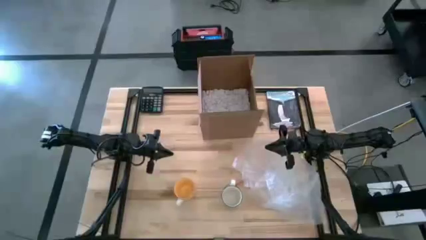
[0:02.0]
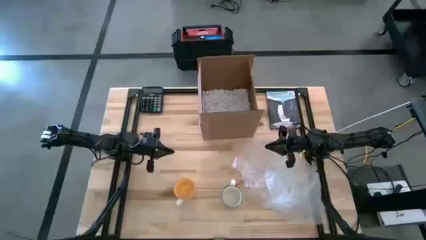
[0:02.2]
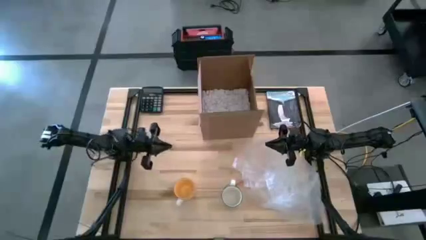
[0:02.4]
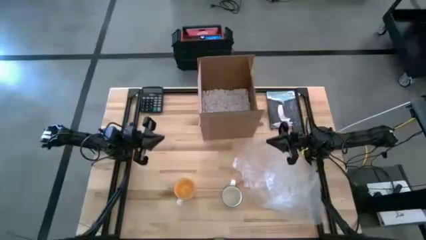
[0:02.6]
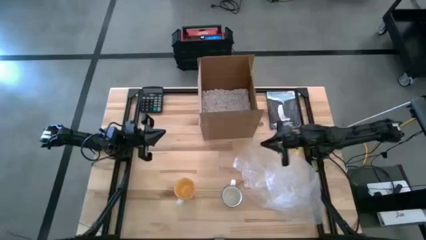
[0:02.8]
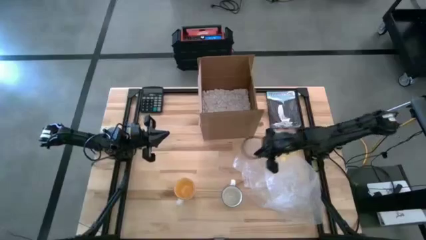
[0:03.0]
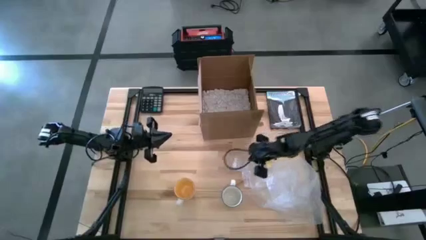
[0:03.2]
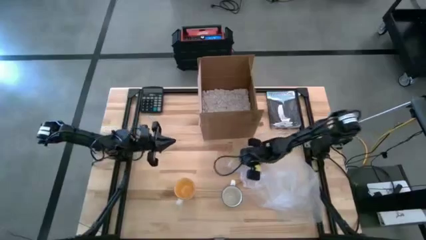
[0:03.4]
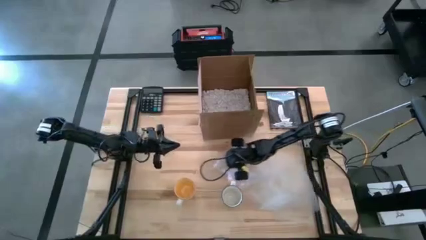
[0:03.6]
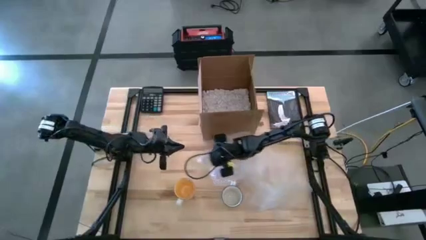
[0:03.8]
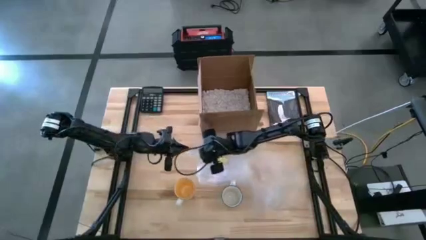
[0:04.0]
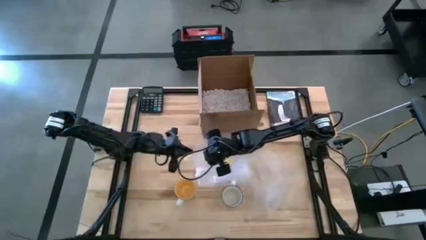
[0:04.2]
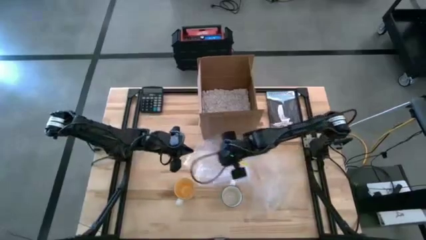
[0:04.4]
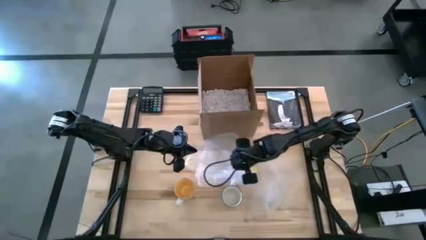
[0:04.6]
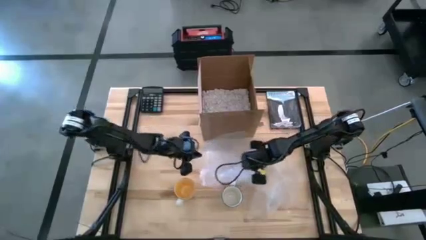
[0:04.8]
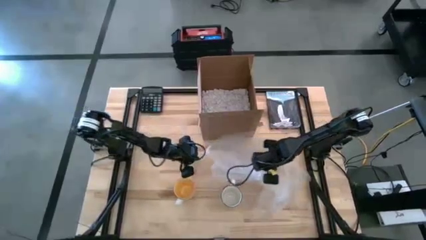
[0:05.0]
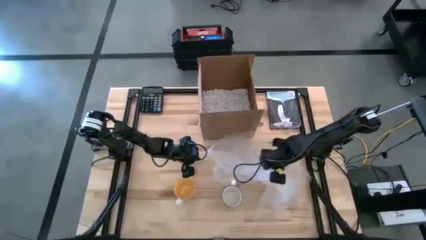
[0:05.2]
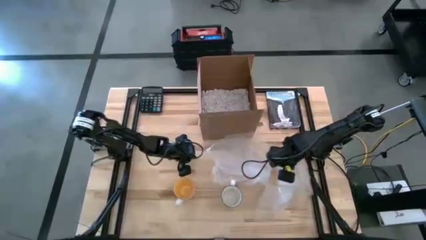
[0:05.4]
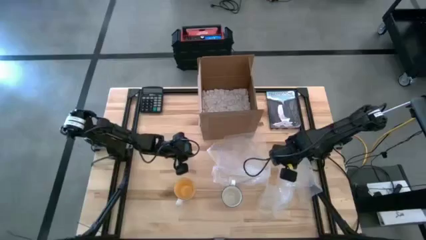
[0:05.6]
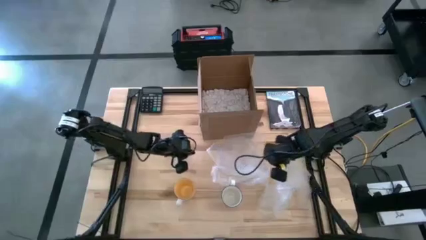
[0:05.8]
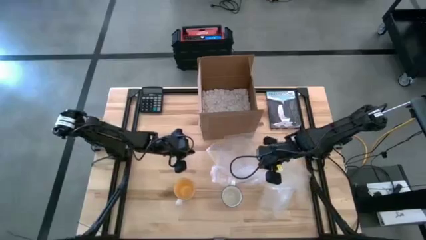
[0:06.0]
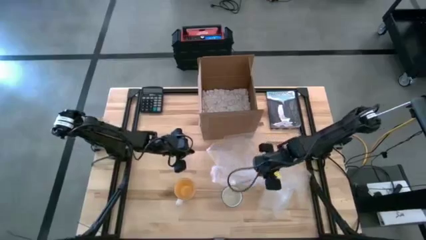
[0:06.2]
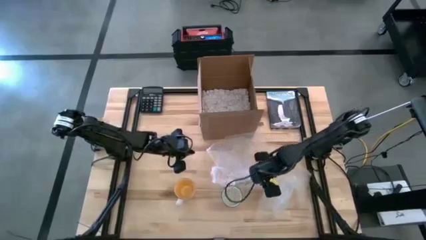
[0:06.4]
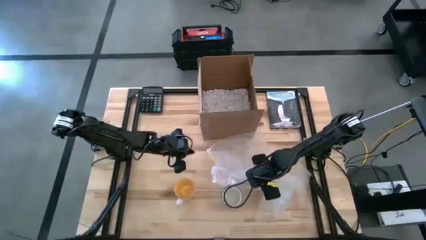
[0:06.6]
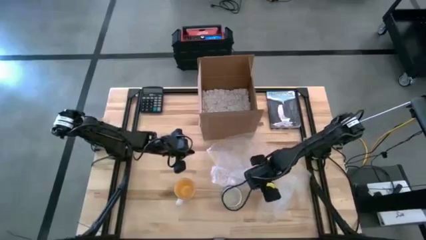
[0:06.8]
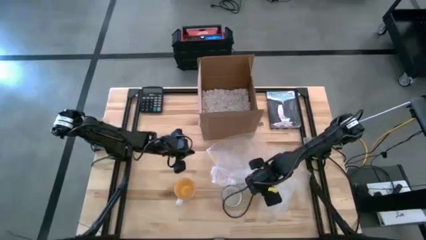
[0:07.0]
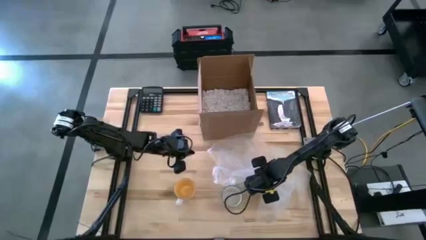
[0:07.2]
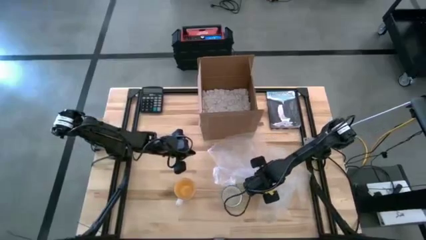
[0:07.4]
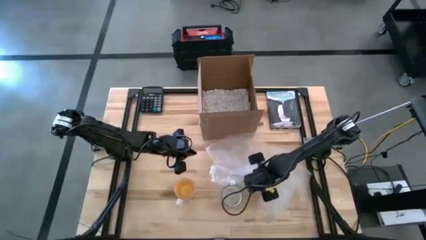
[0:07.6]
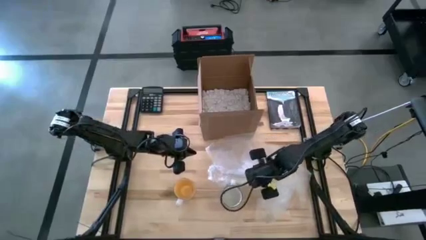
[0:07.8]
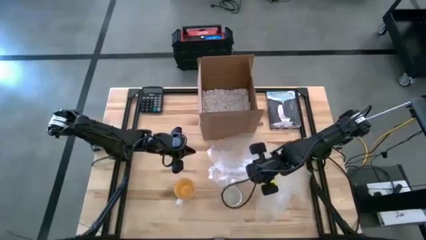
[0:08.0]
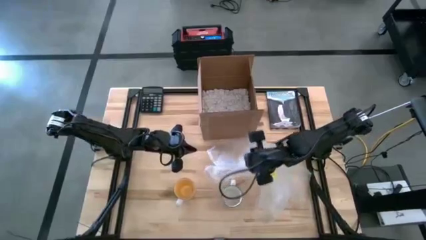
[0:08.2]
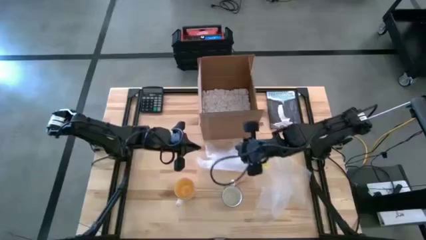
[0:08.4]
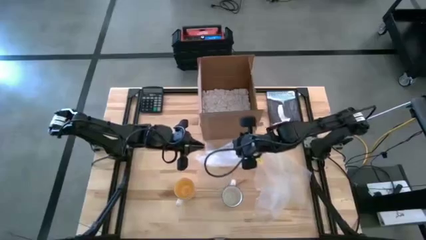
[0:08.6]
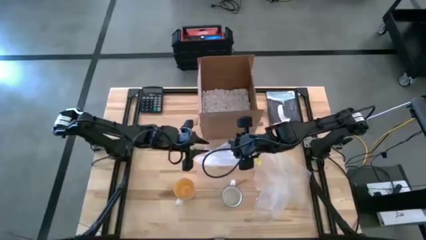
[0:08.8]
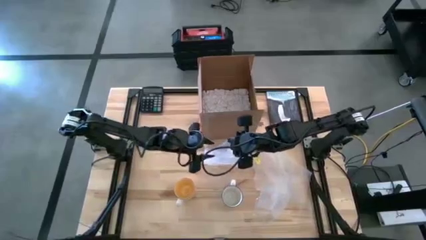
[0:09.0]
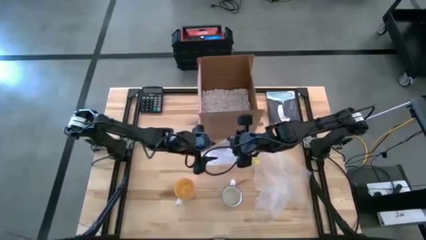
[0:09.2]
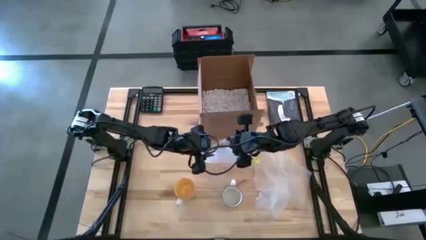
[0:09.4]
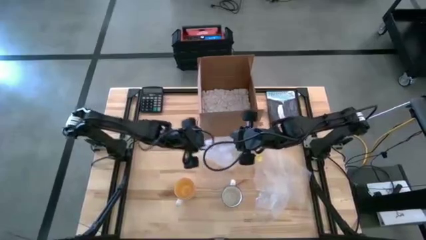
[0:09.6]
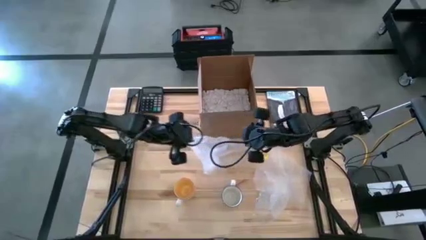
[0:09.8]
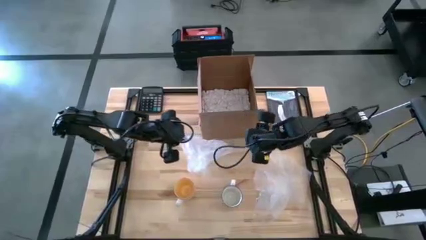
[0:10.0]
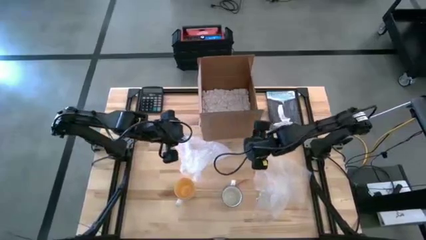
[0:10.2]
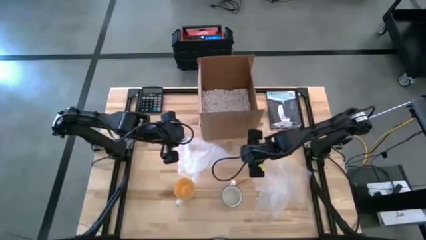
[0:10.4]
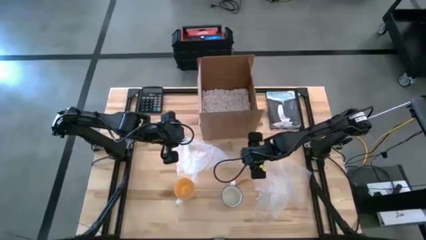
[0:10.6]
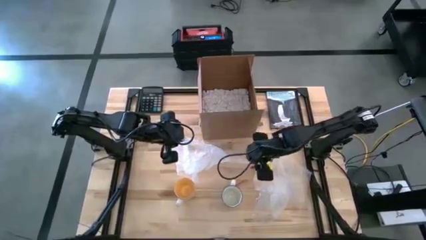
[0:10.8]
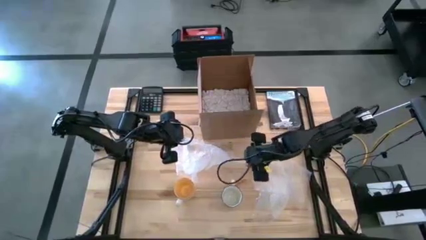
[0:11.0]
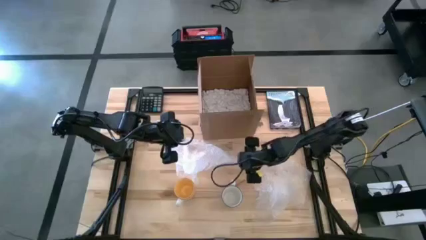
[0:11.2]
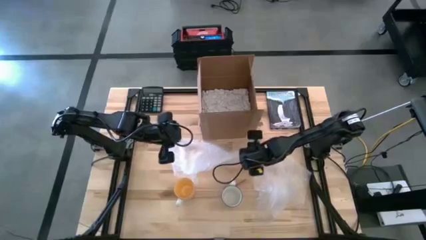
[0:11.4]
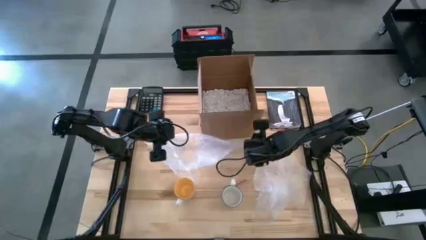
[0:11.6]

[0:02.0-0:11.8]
Task: wrap mug
Prepare the bubble wrap

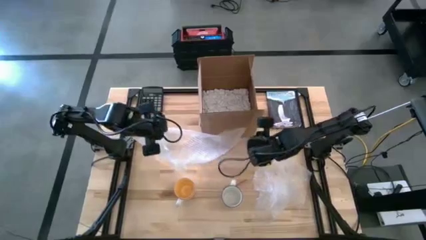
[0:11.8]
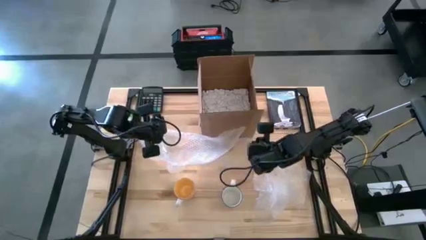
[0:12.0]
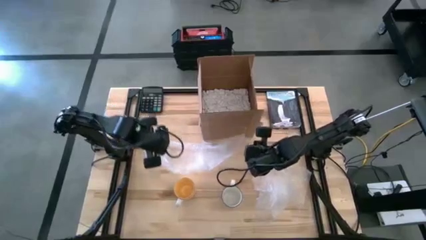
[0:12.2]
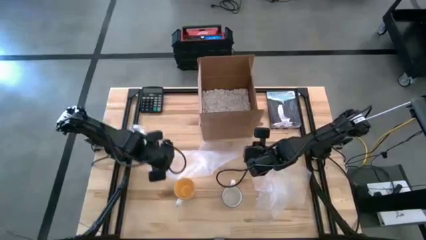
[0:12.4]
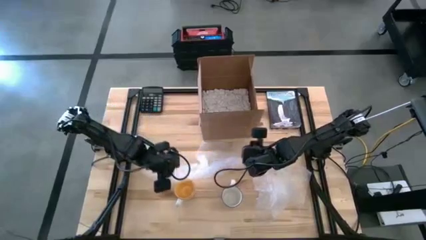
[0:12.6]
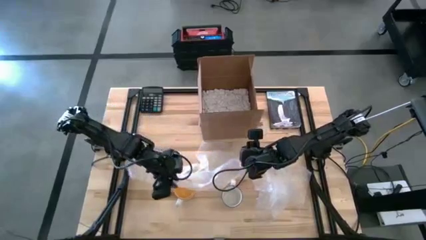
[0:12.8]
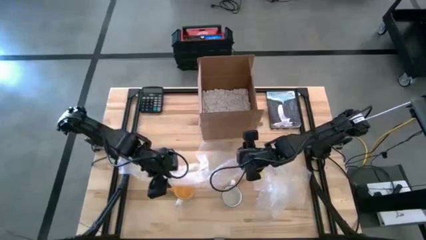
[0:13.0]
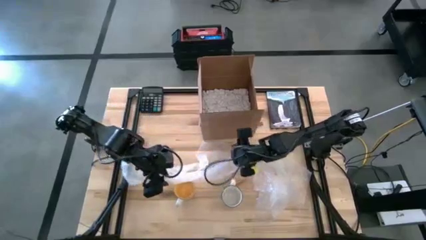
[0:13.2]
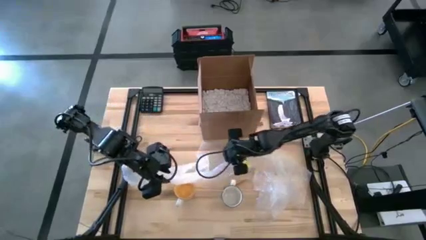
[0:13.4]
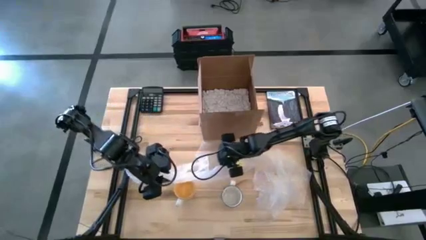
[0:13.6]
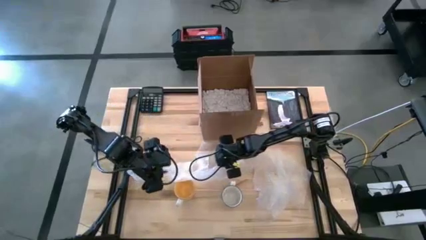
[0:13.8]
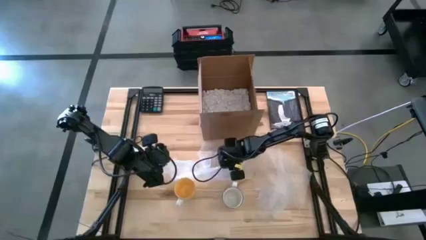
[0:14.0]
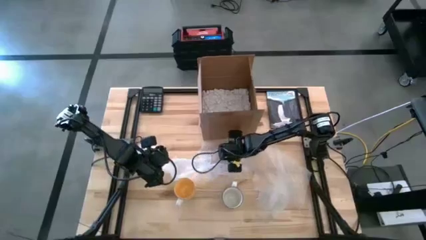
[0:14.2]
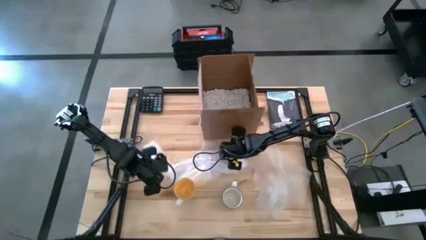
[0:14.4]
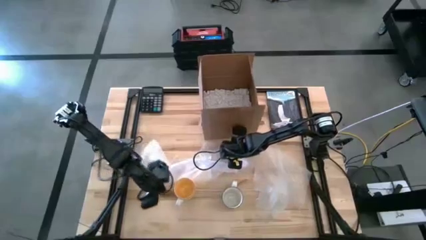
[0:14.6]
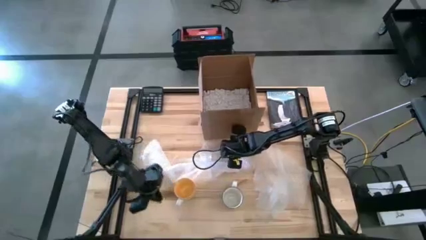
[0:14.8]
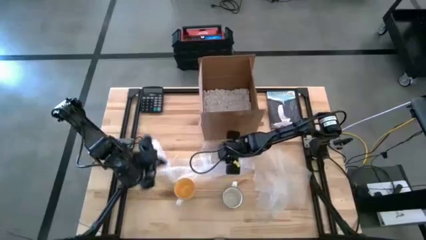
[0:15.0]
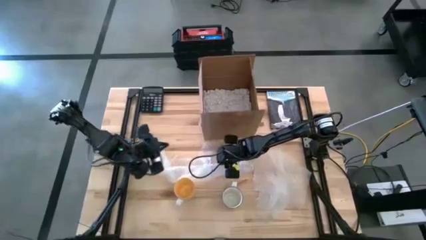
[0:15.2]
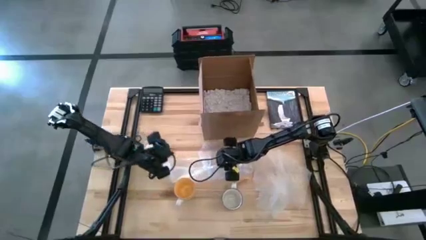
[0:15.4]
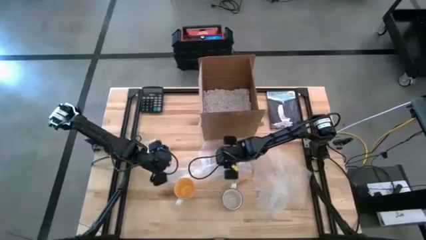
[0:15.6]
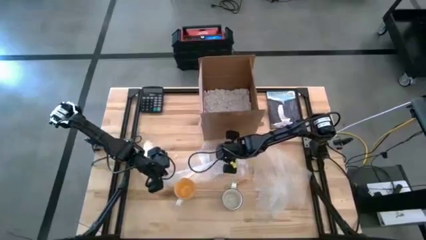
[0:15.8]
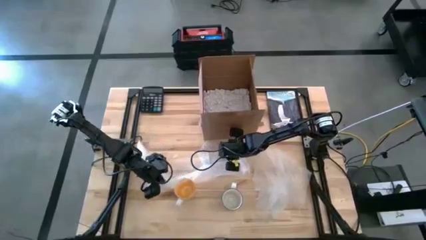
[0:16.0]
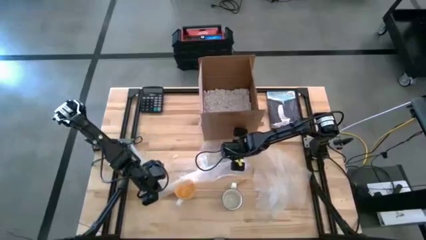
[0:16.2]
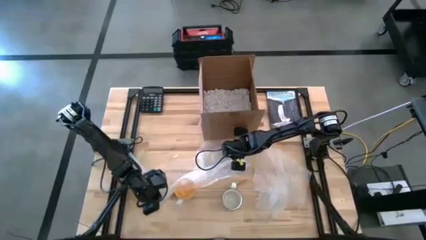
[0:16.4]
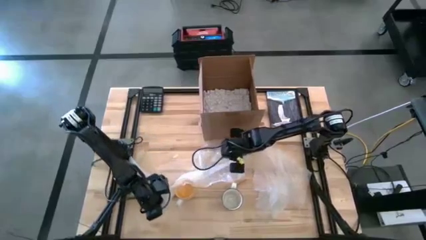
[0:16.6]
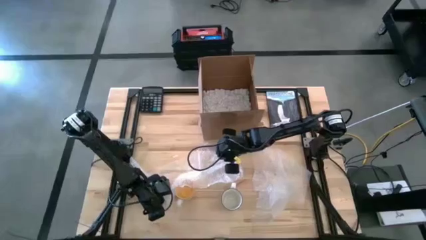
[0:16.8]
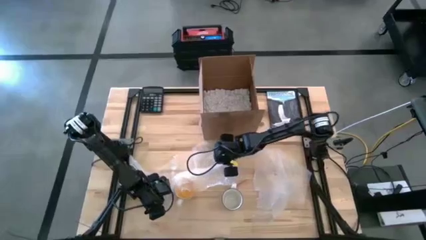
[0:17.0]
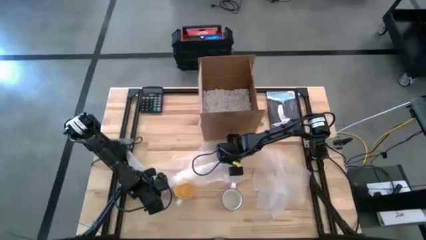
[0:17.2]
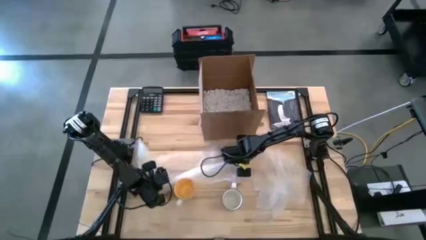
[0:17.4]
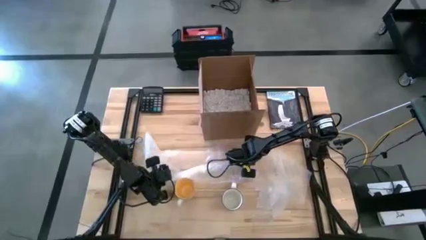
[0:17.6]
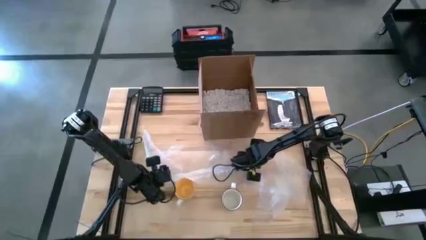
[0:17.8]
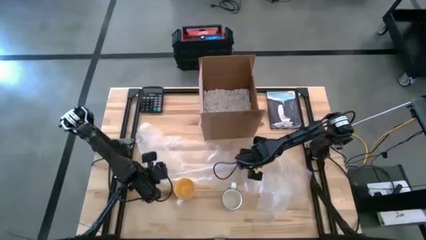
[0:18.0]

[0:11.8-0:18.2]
Prepare the bubble wrap
